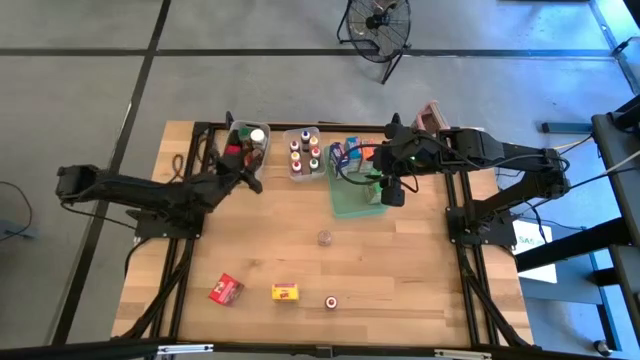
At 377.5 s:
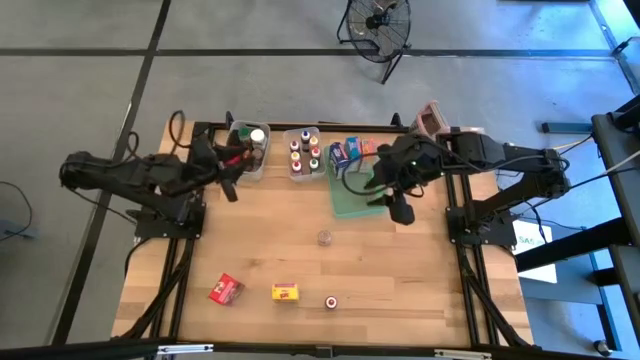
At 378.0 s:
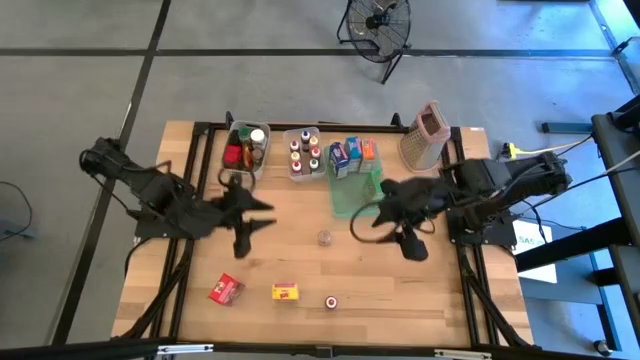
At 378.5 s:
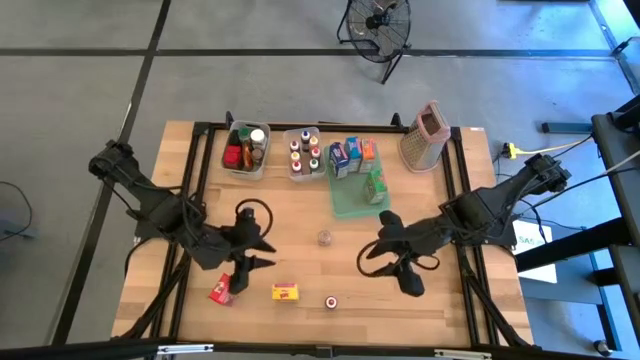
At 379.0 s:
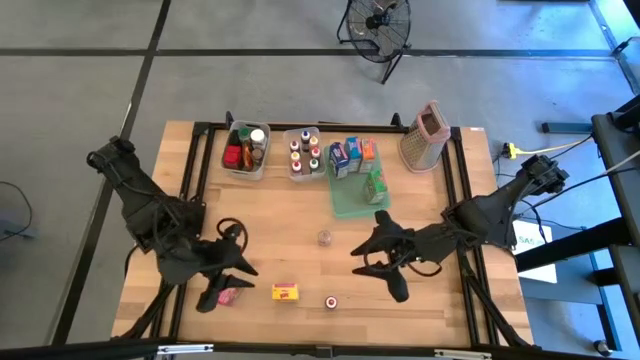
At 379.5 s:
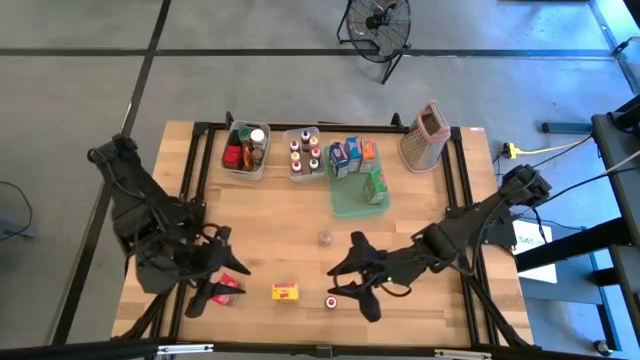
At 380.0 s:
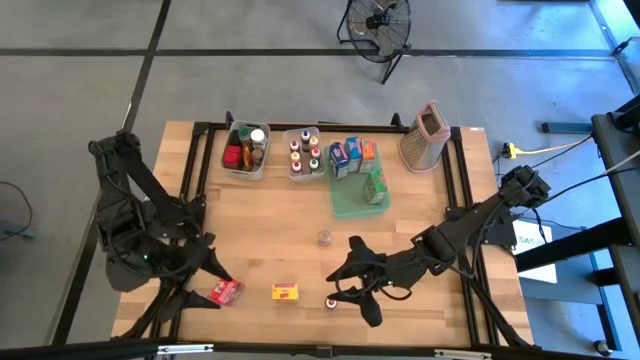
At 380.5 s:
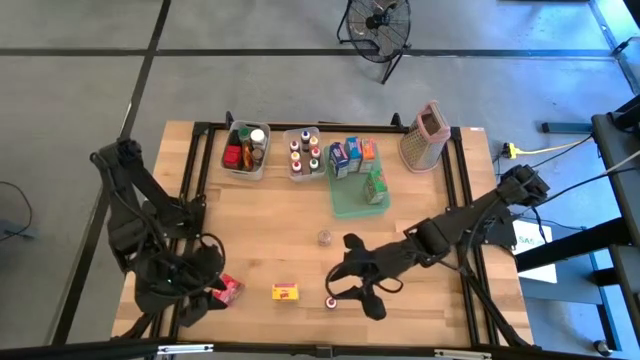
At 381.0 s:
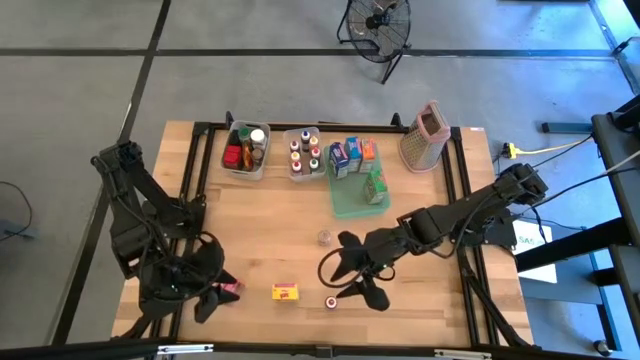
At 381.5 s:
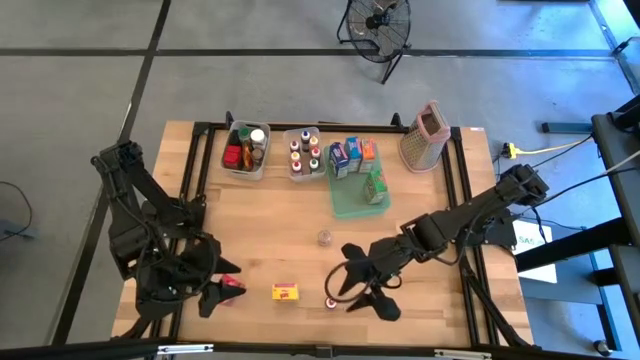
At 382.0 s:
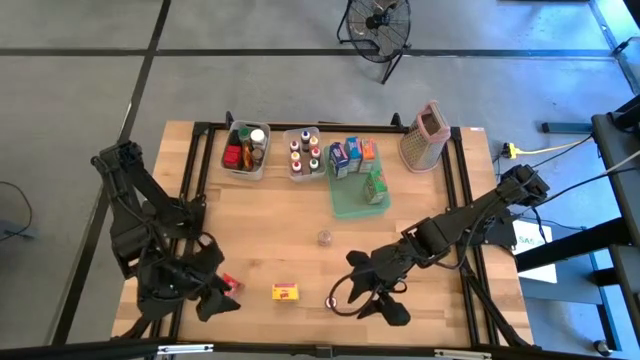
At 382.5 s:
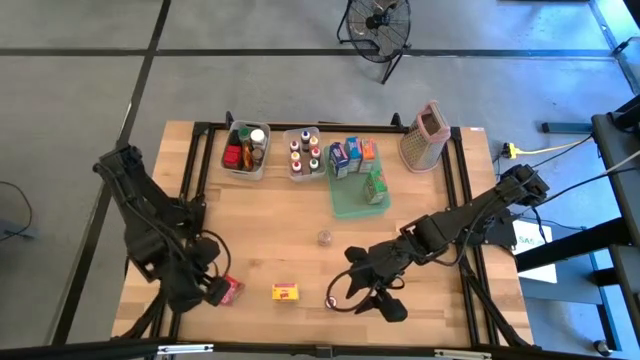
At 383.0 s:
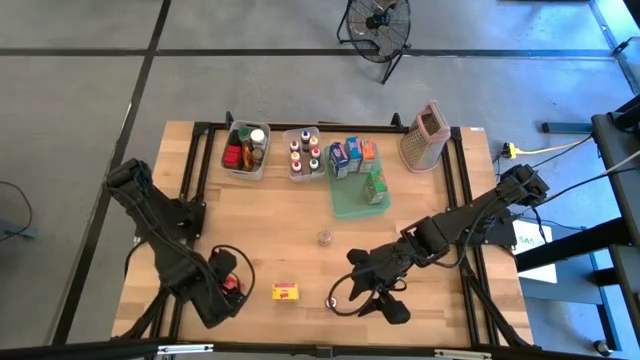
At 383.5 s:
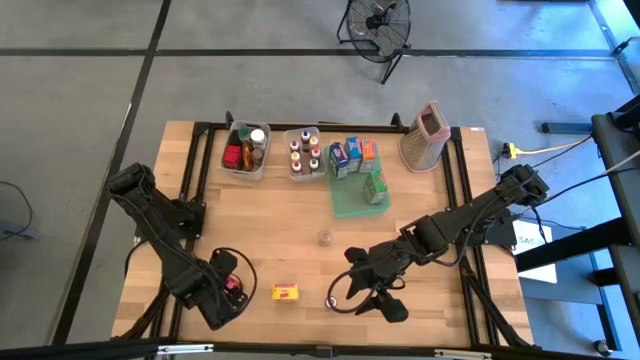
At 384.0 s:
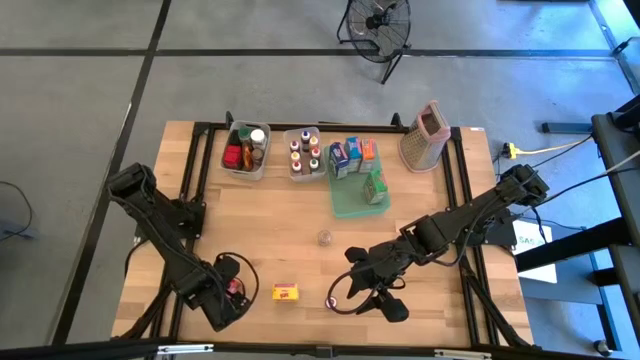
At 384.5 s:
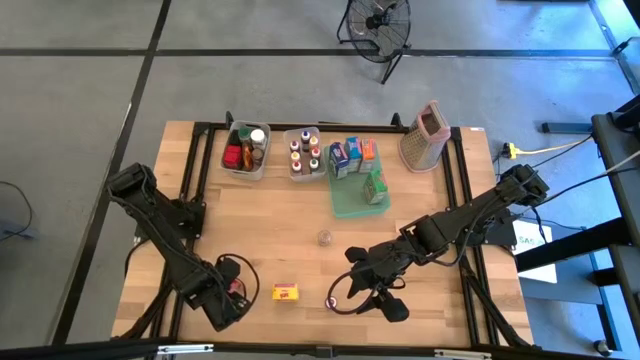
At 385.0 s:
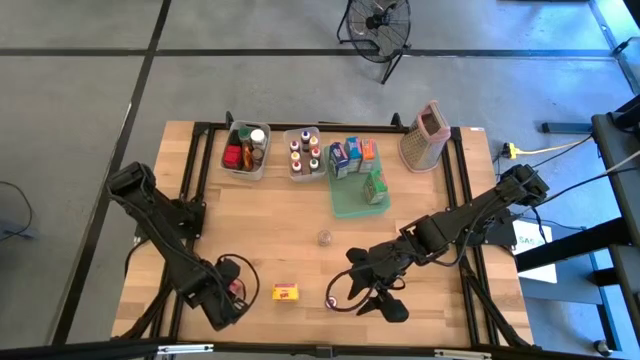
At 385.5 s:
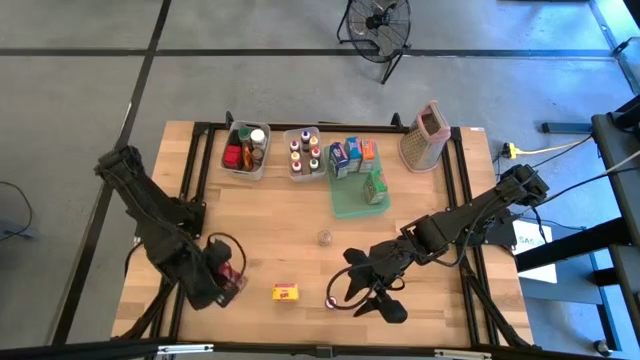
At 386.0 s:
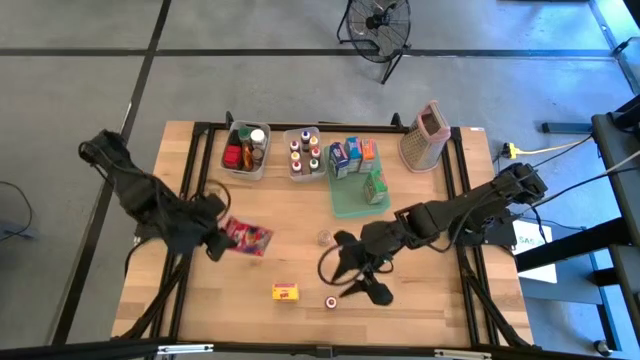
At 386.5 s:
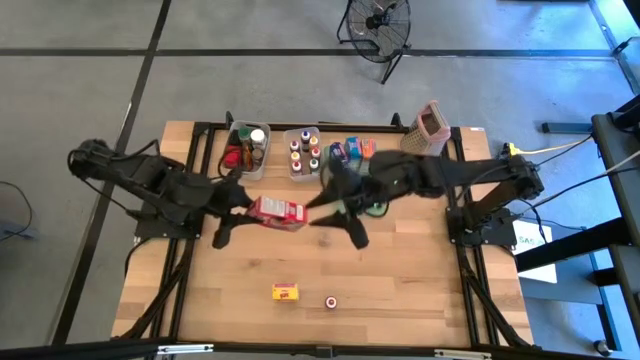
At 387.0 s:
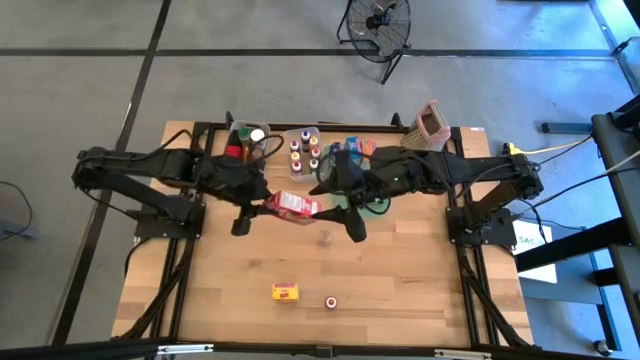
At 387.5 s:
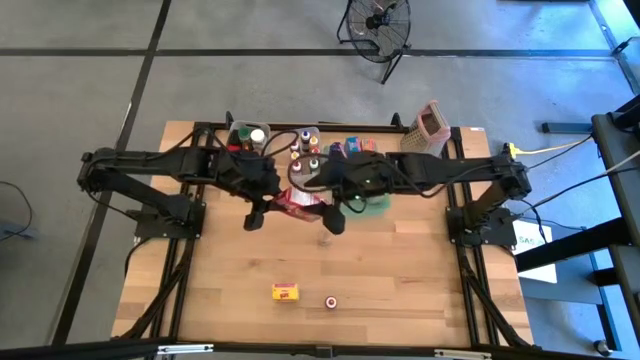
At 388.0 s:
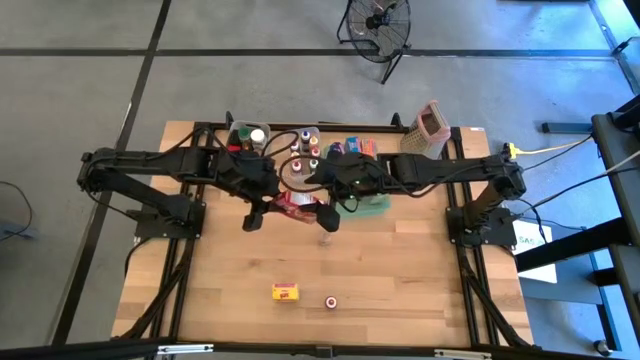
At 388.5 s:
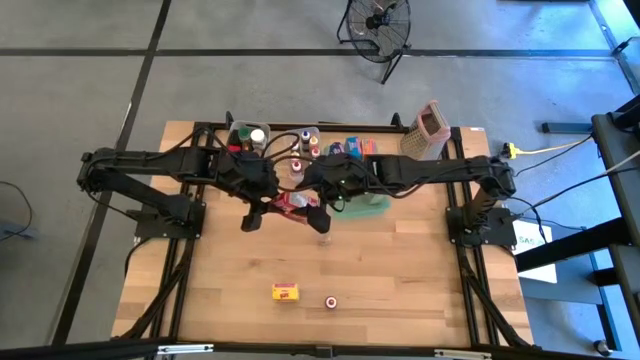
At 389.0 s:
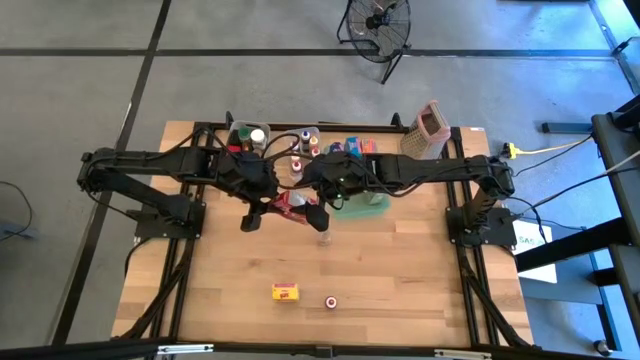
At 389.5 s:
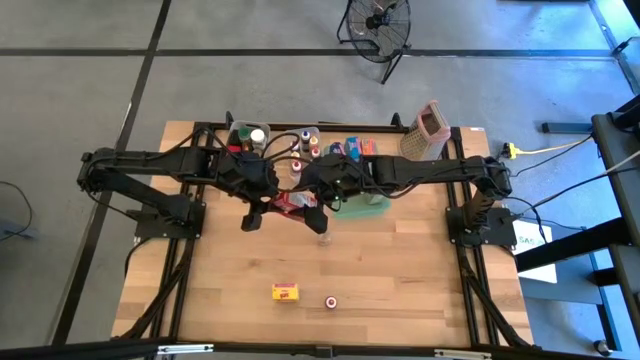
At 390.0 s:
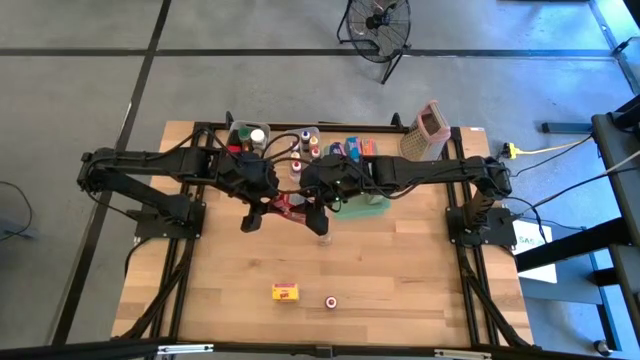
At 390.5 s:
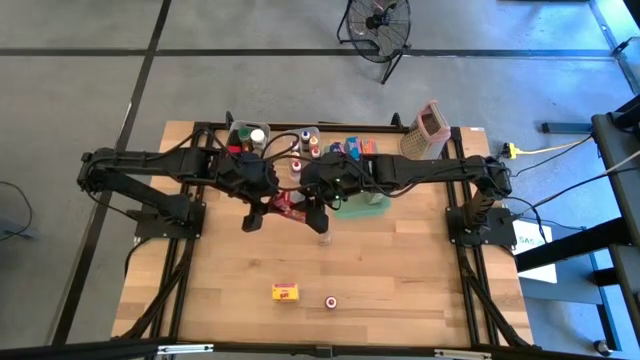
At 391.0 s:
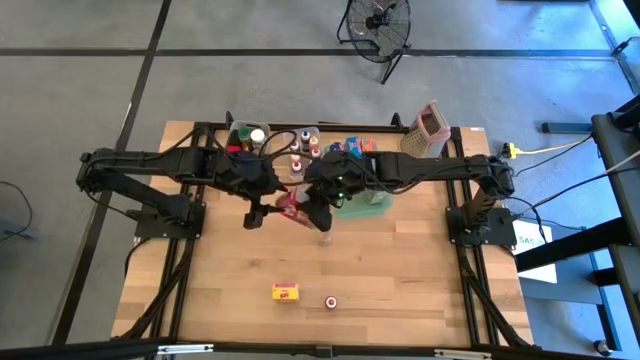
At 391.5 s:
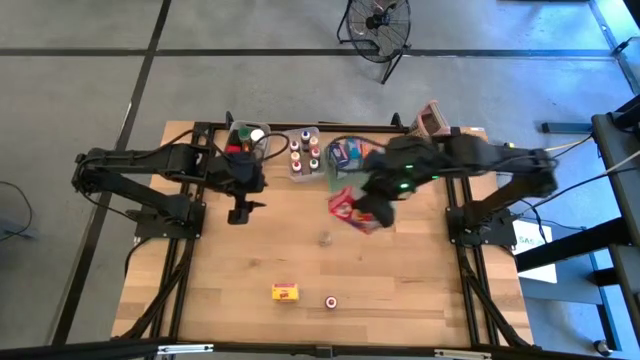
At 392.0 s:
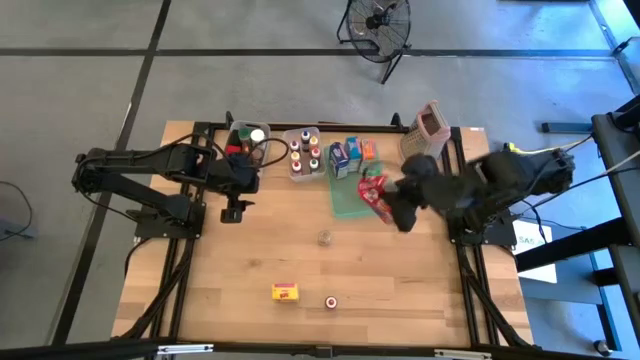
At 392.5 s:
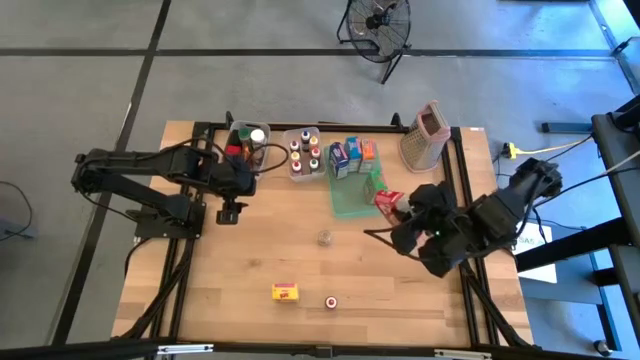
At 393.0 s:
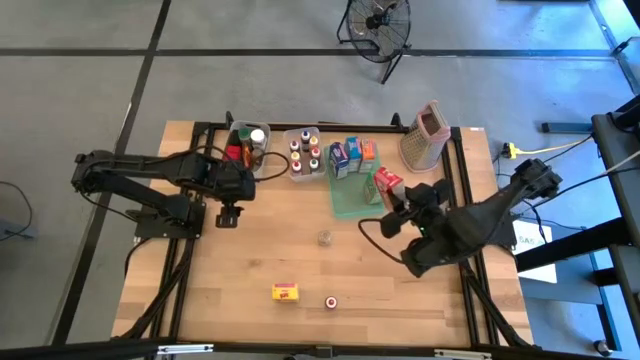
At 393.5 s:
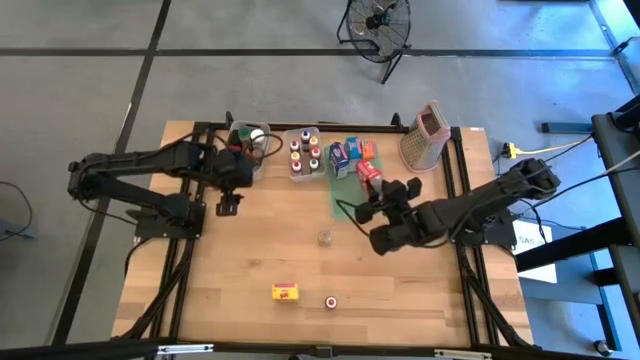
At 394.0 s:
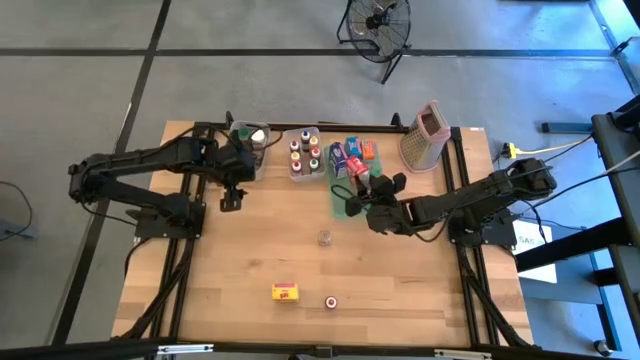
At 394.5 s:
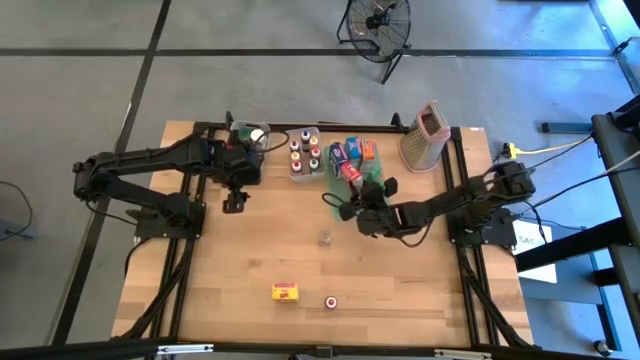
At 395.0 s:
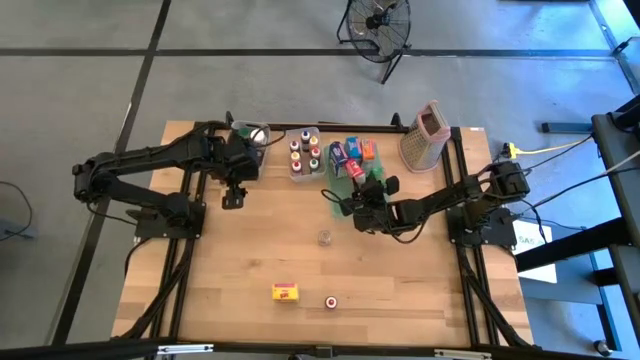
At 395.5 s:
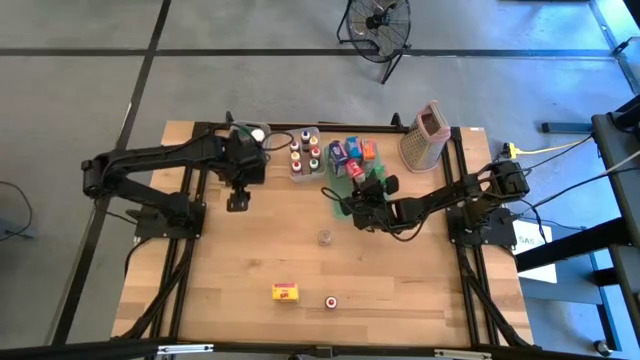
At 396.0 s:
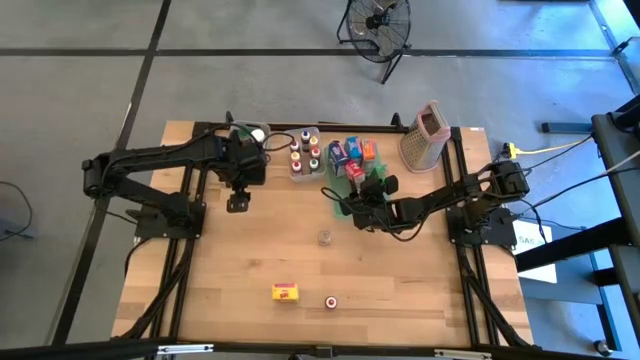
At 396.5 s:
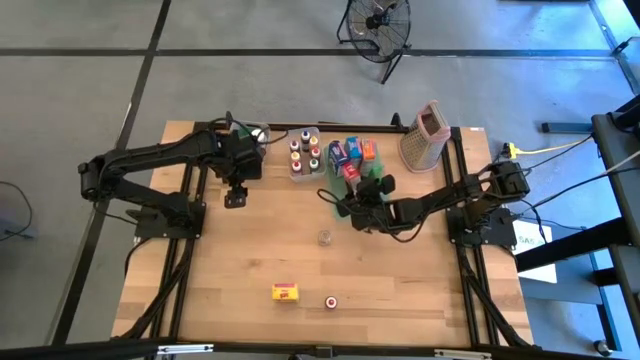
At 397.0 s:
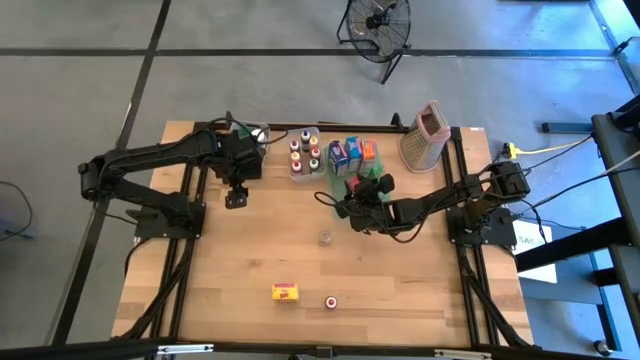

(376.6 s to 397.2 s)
Task: Pick & Place Kitchen Items
Put the red cereal box into the blue bin

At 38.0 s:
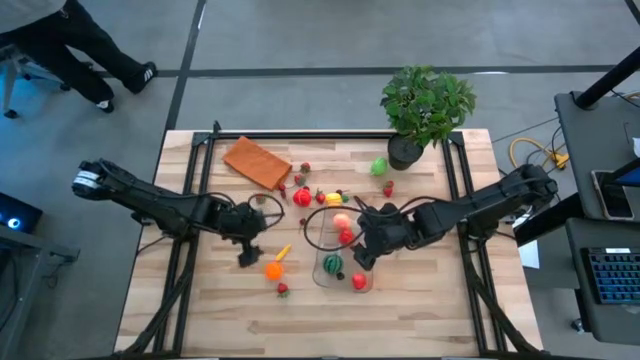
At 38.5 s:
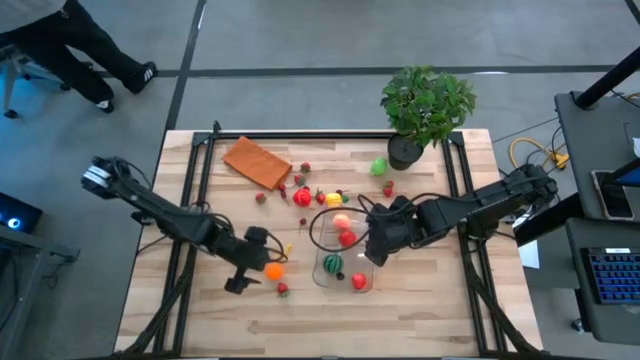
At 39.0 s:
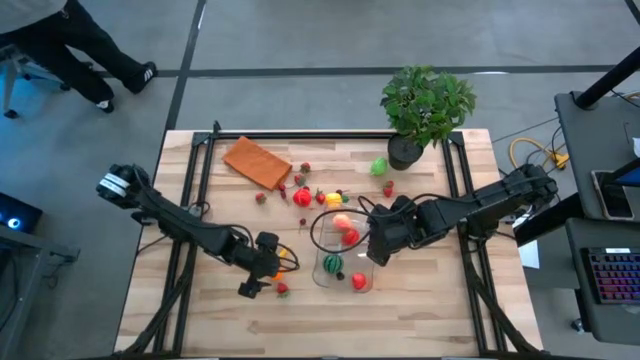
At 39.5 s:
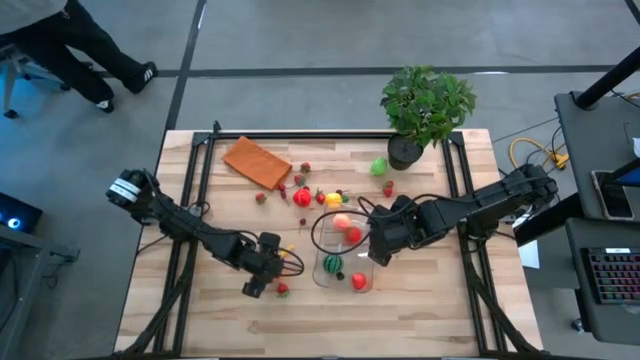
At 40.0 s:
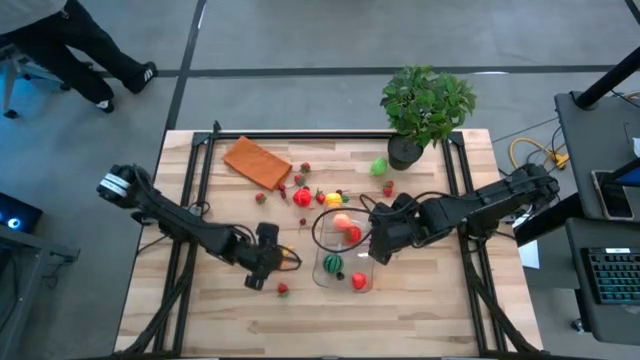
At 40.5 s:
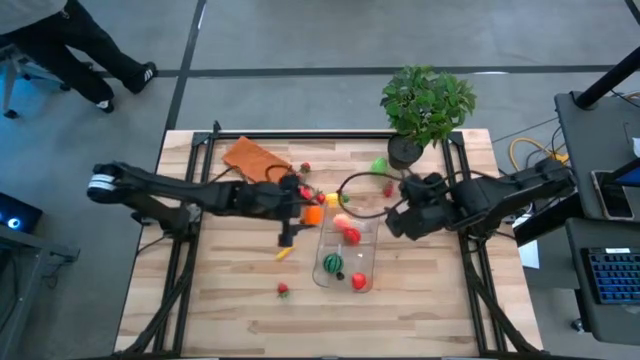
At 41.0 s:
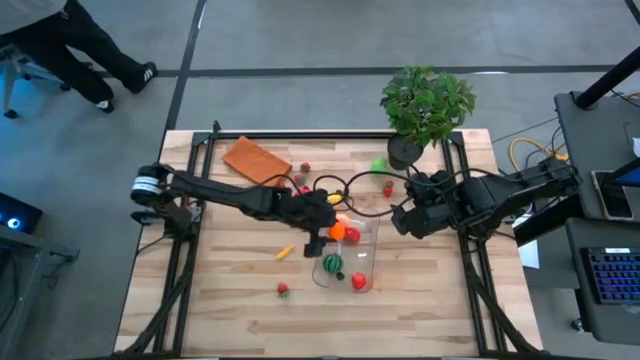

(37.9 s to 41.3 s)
Task: Pick and placing Produce into tupperware
Put the pumpkin into the transparent bin
